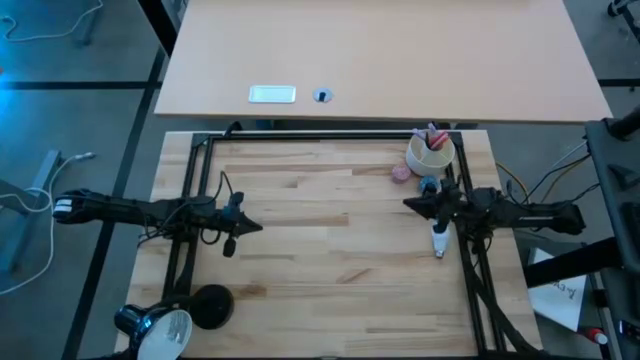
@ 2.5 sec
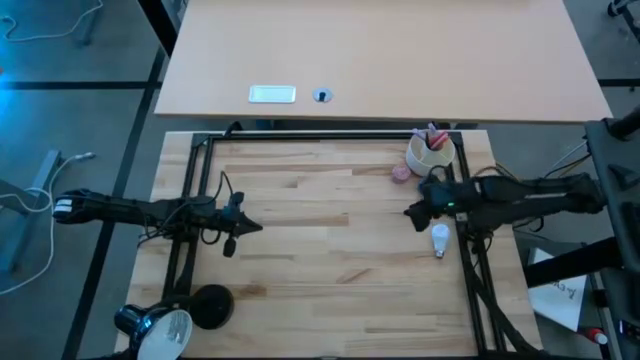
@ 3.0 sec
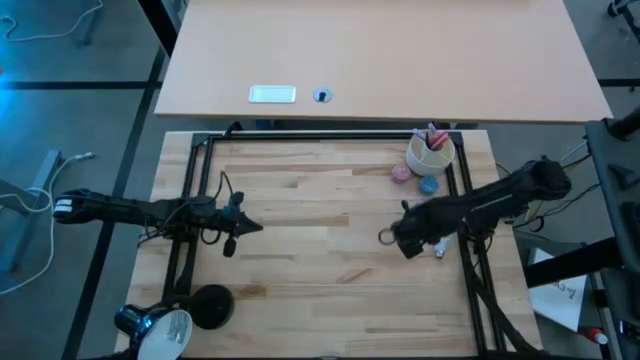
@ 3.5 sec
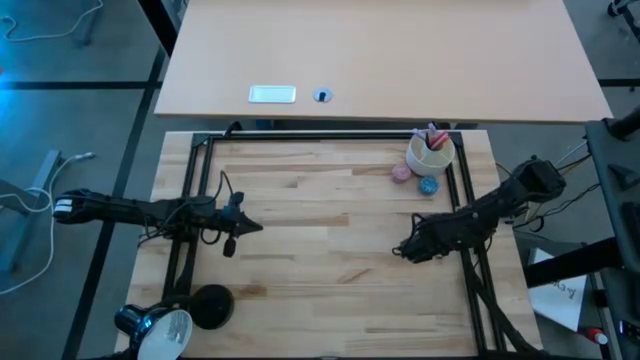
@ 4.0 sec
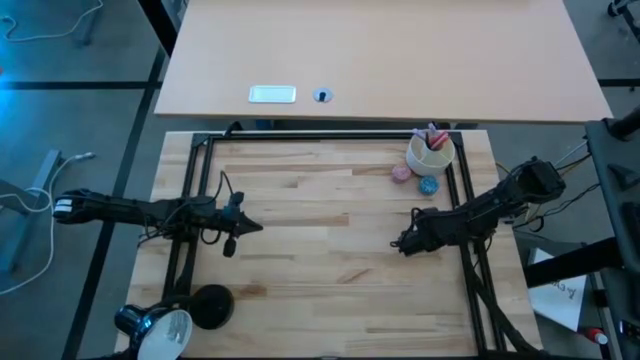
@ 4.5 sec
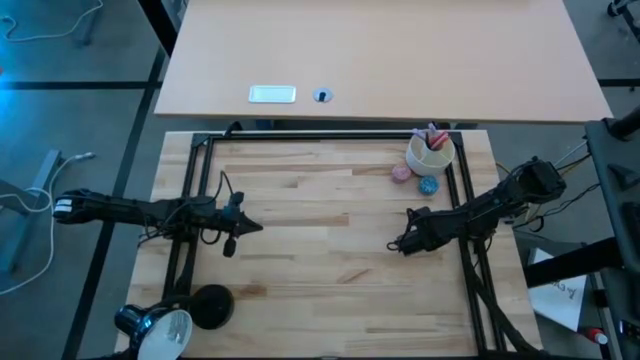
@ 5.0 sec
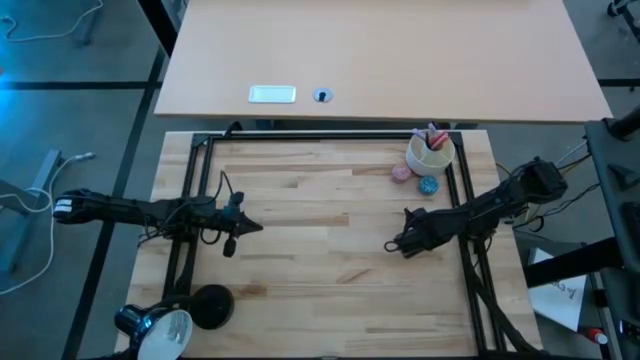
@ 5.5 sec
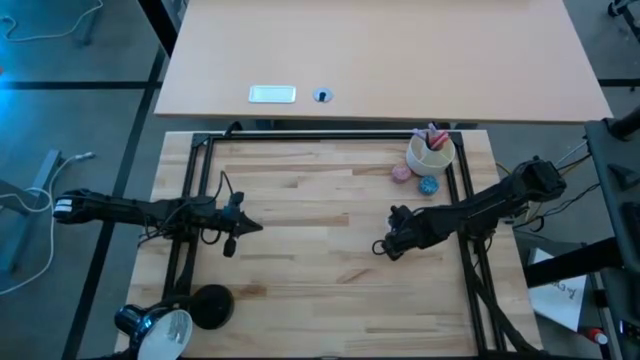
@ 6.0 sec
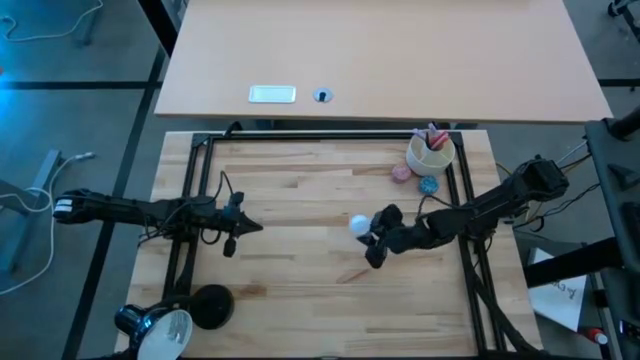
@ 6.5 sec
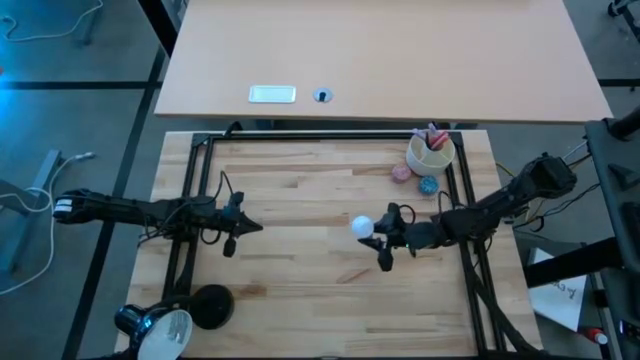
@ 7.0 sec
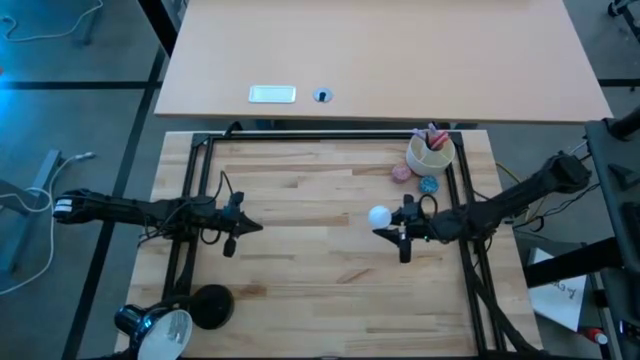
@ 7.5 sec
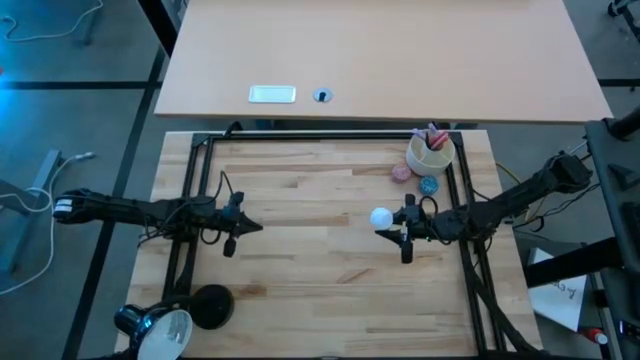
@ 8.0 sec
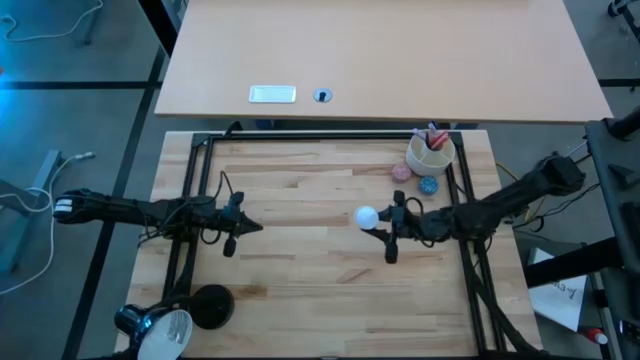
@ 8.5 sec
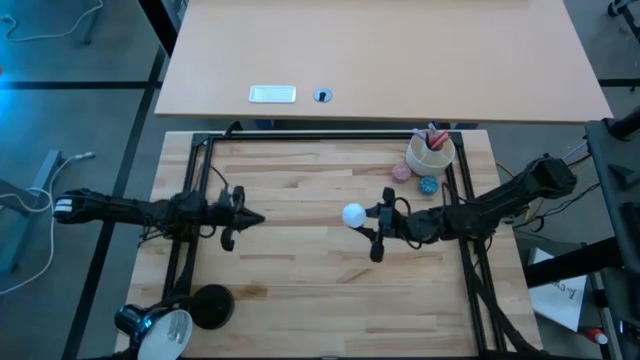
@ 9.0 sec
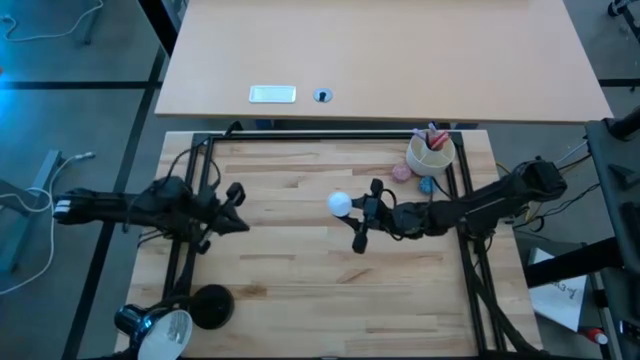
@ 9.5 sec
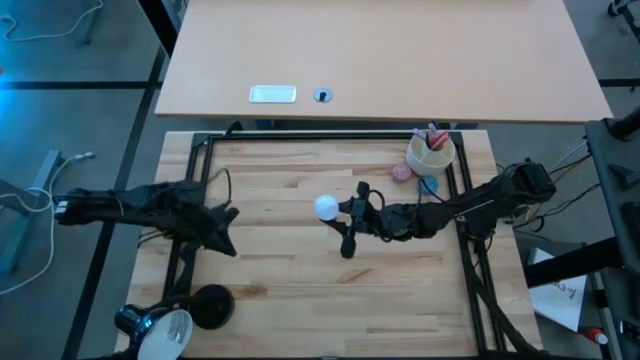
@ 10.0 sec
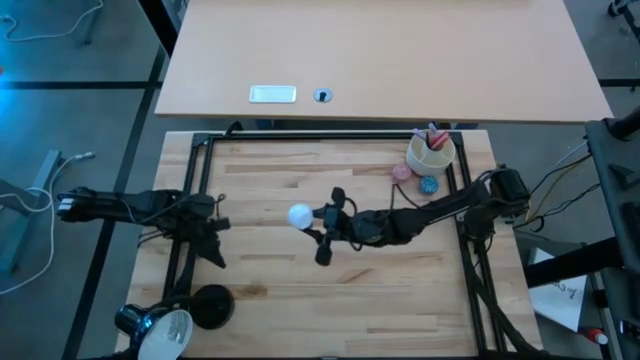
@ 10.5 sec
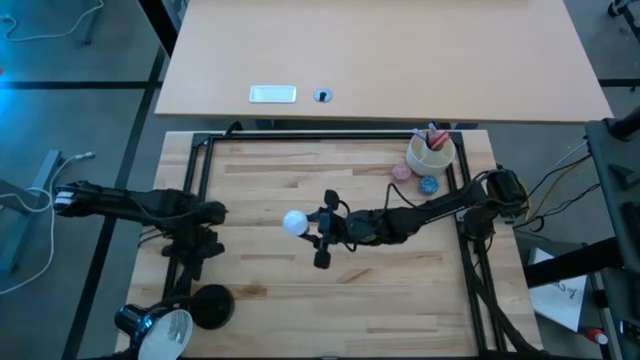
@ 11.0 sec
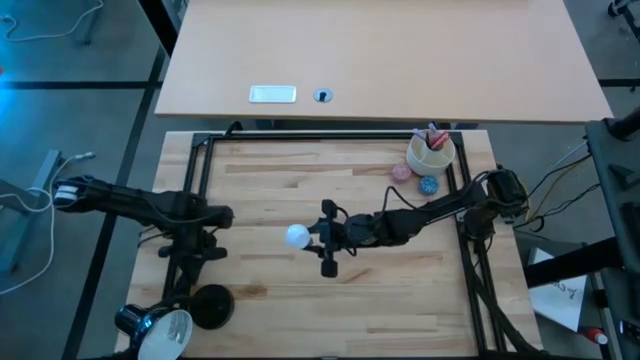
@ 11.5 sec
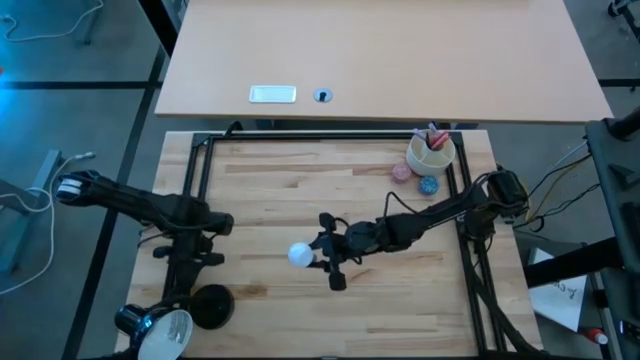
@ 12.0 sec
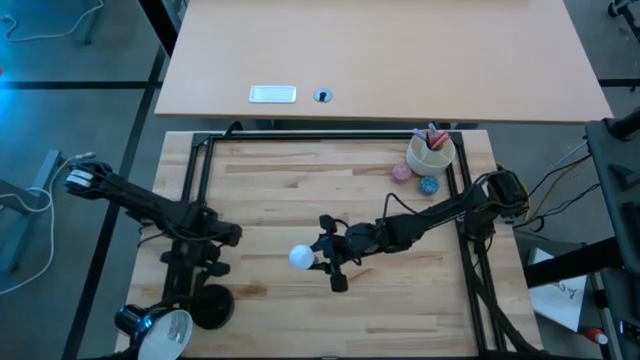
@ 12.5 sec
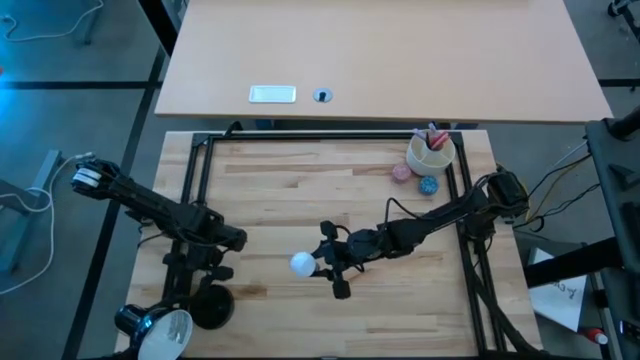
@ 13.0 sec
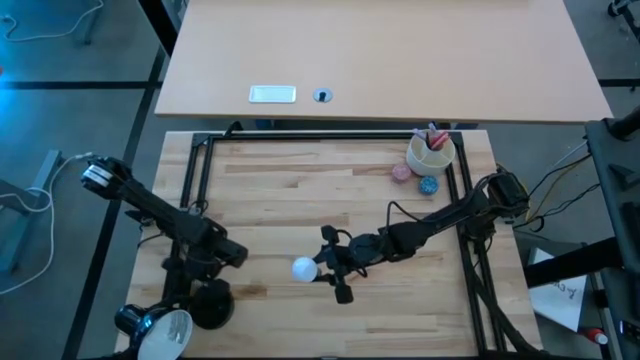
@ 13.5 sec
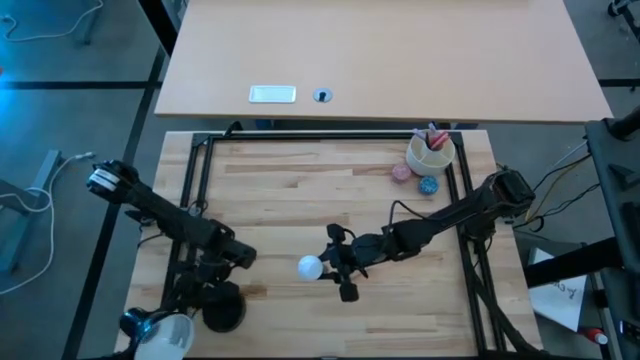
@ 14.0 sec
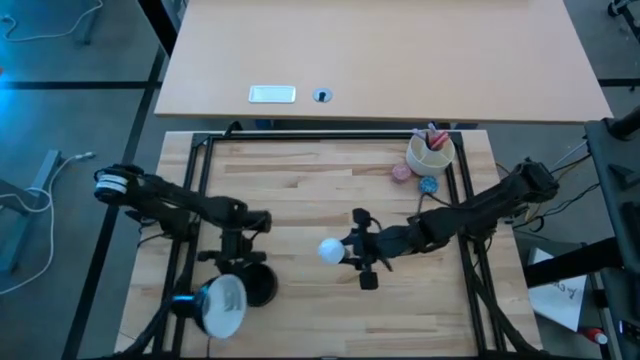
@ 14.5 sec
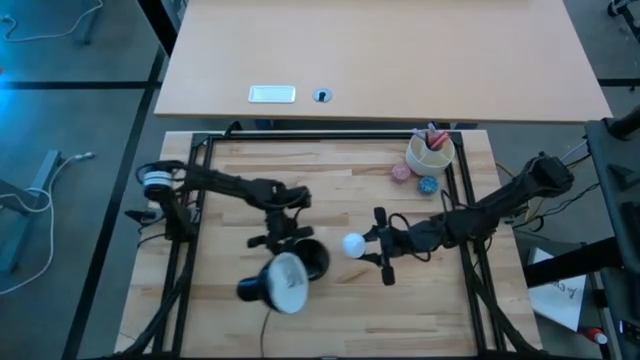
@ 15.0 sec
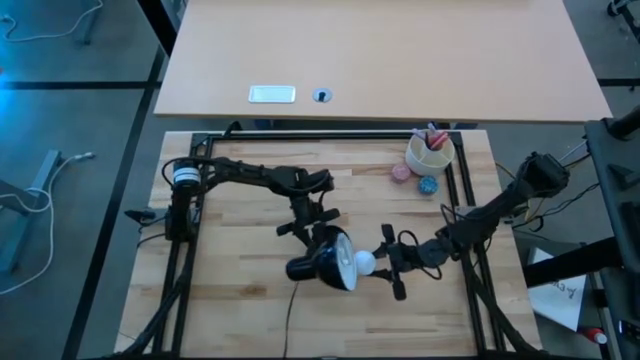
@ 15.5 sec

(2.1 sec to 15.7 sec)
Task: Screw lightbulb
Insert the lightbulb into the lamp
